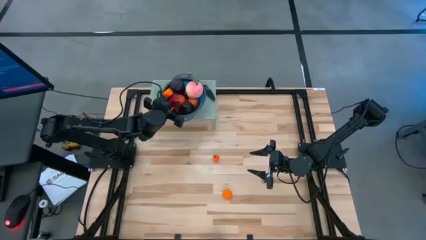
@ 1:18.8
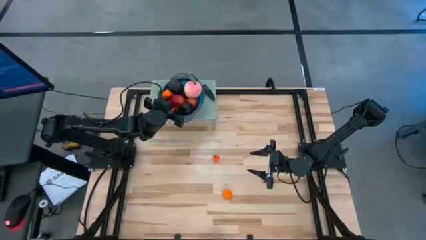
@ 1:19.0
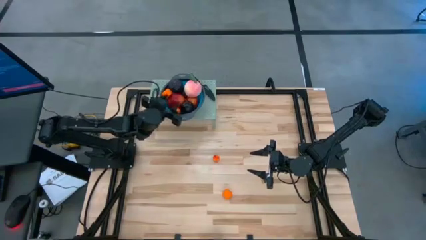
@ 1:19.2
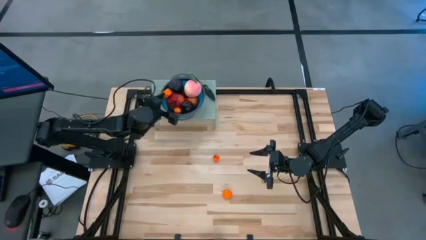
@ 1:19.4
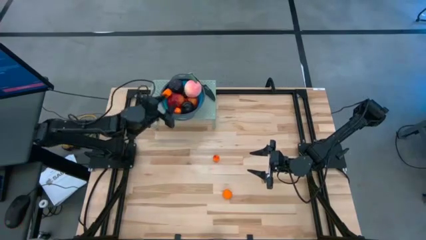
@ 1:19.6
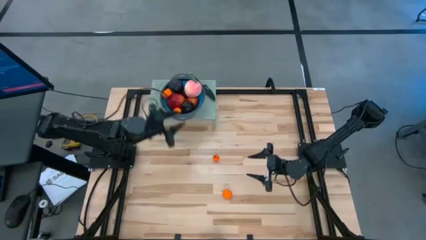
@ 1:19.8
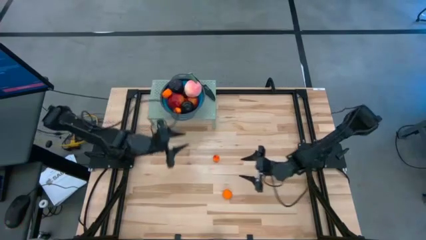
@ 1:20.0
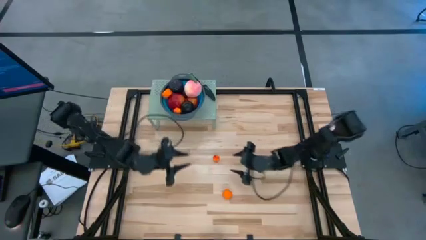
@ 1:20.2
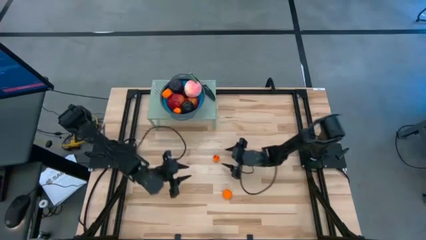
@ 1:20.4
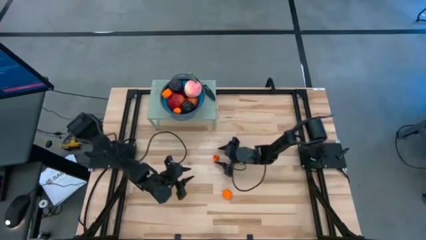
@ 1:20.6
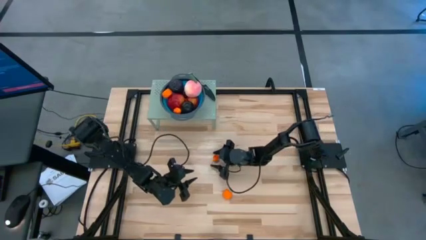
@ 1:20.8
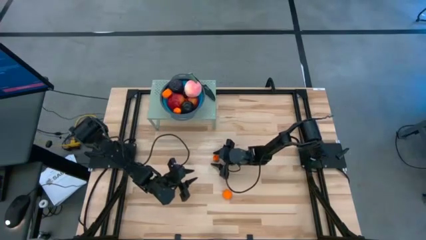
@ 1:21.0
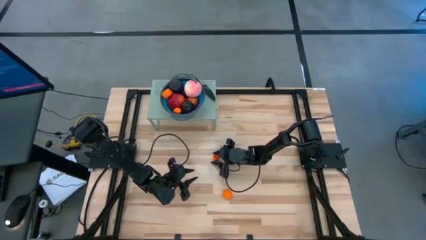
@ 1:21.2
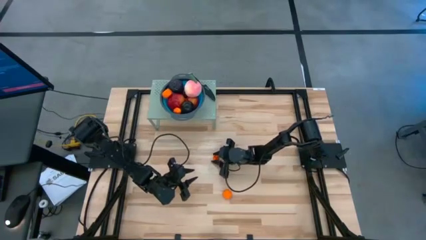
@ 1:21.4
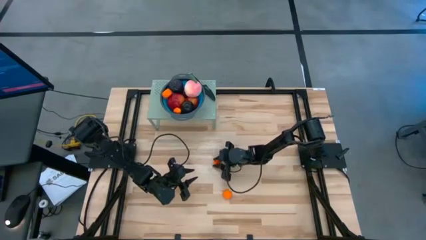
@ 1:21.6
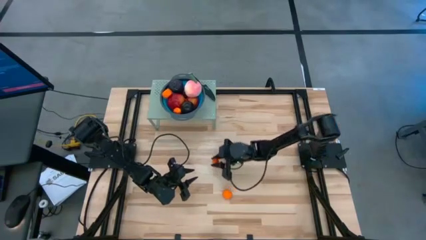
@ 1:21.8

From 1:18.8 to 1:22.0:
Task: Pick & Place Fruit
Put the orange pear into the blue strainer bowl on the shelf

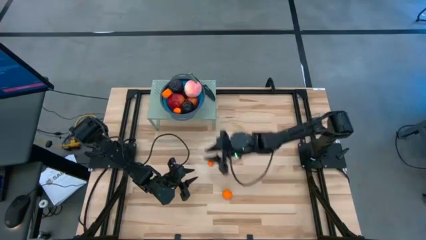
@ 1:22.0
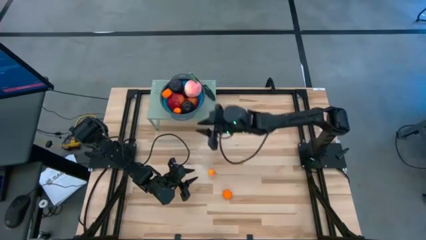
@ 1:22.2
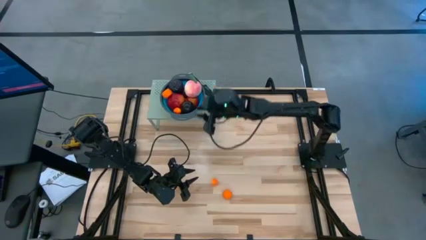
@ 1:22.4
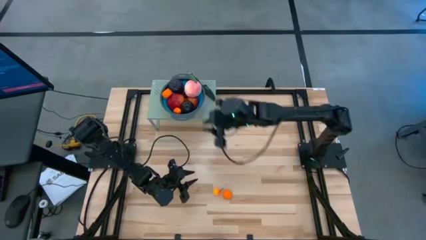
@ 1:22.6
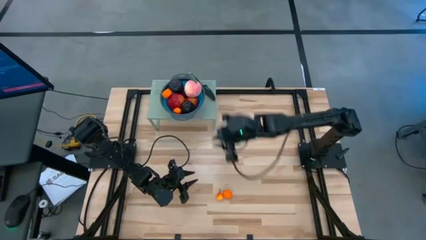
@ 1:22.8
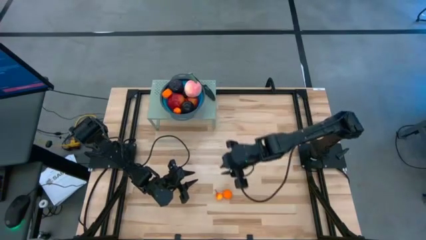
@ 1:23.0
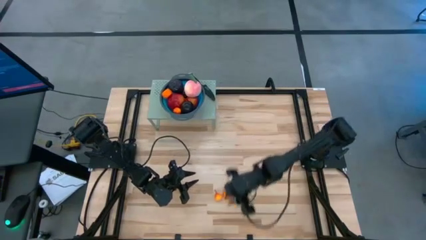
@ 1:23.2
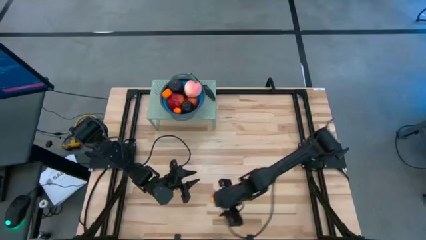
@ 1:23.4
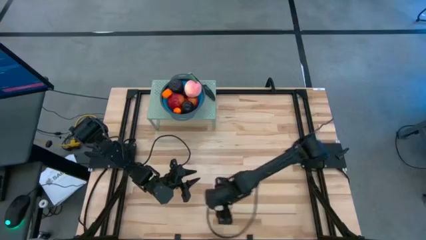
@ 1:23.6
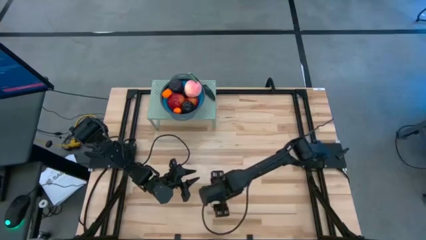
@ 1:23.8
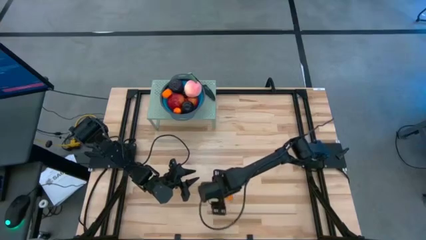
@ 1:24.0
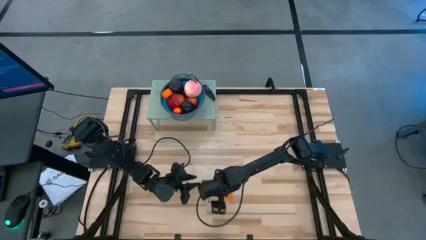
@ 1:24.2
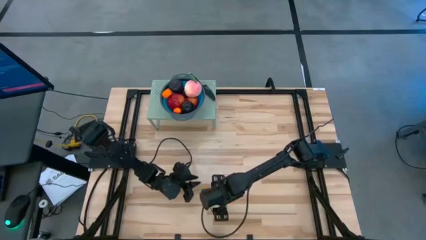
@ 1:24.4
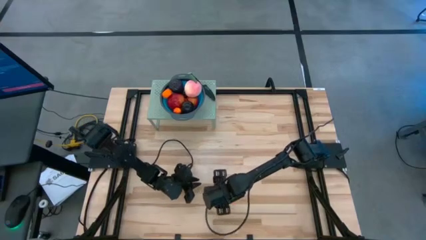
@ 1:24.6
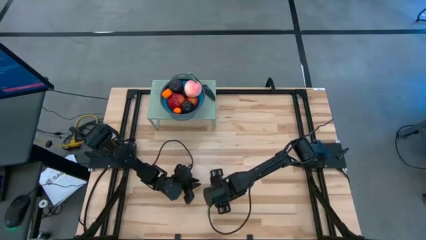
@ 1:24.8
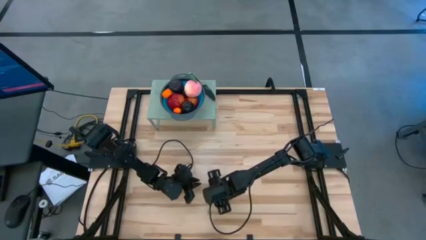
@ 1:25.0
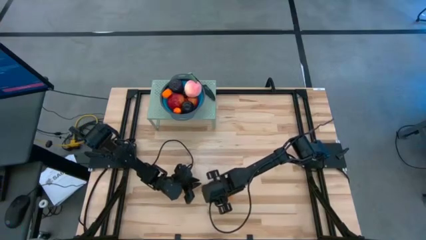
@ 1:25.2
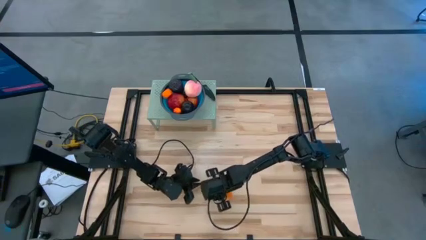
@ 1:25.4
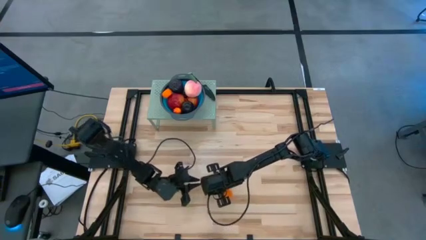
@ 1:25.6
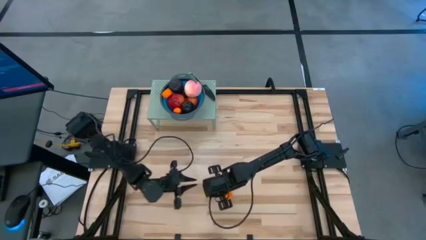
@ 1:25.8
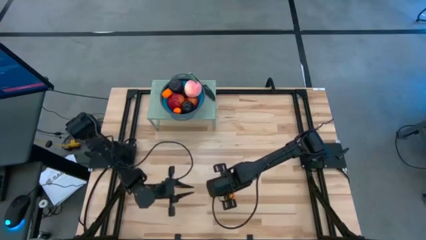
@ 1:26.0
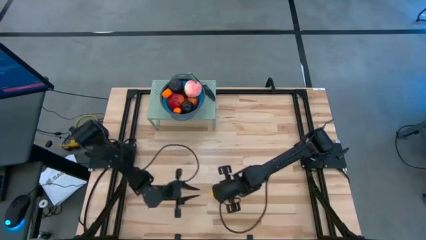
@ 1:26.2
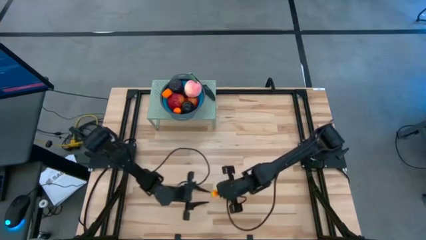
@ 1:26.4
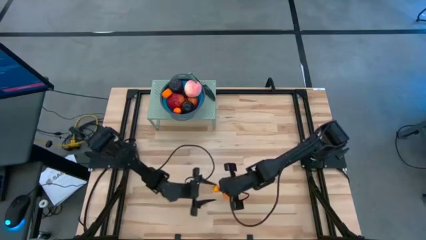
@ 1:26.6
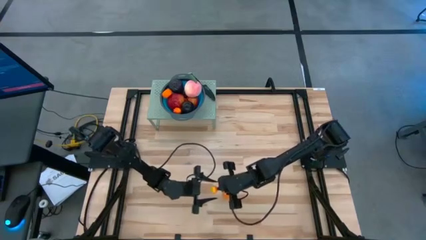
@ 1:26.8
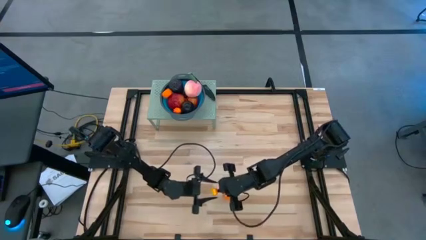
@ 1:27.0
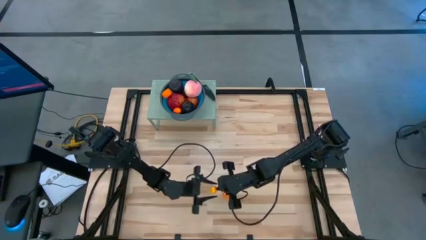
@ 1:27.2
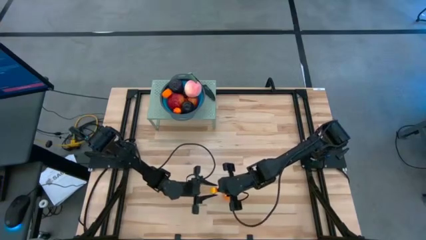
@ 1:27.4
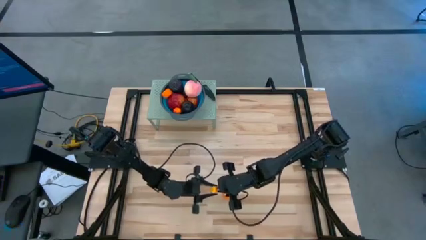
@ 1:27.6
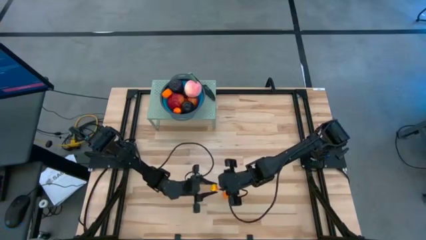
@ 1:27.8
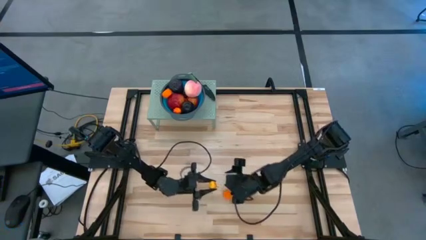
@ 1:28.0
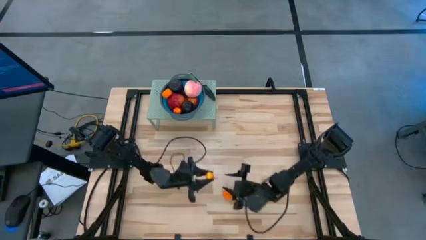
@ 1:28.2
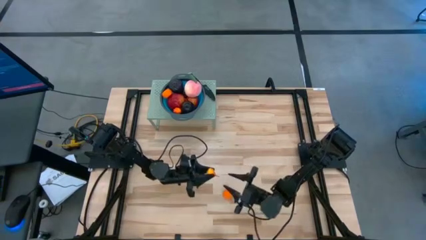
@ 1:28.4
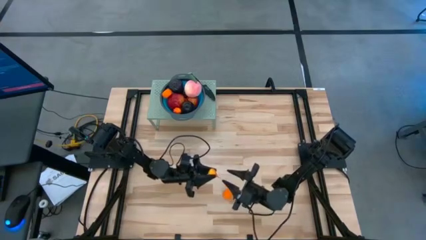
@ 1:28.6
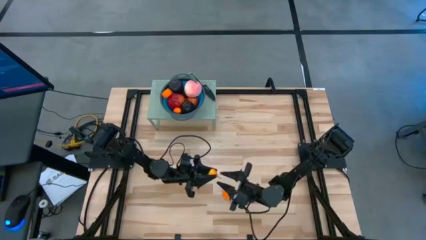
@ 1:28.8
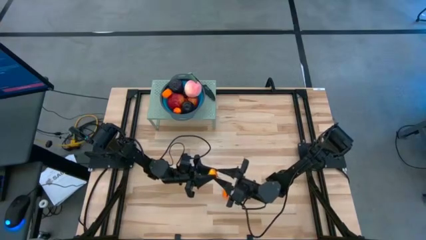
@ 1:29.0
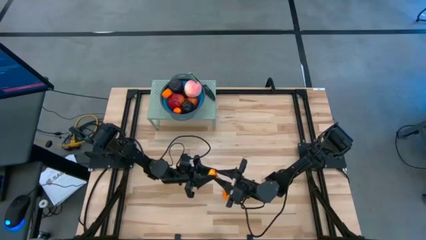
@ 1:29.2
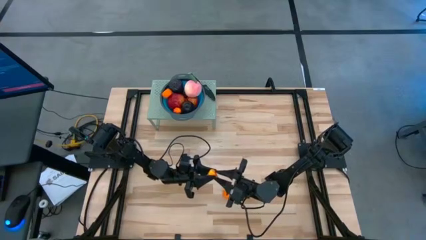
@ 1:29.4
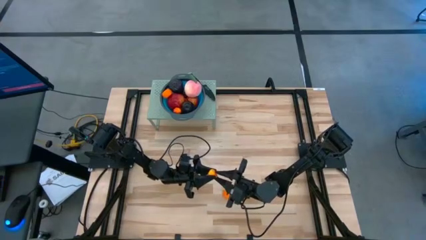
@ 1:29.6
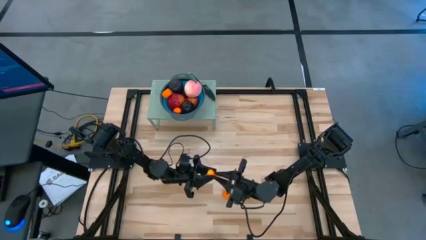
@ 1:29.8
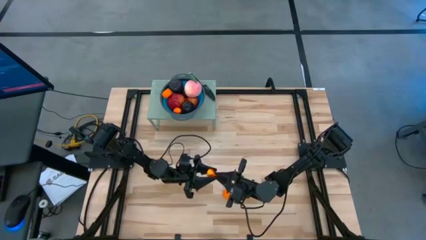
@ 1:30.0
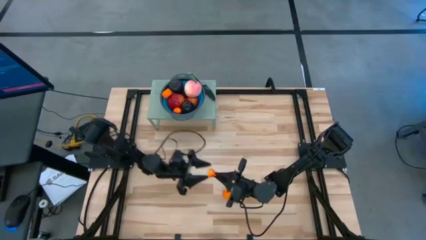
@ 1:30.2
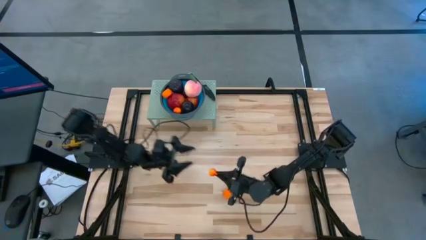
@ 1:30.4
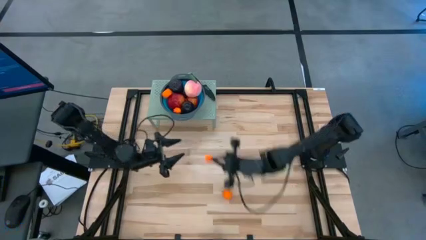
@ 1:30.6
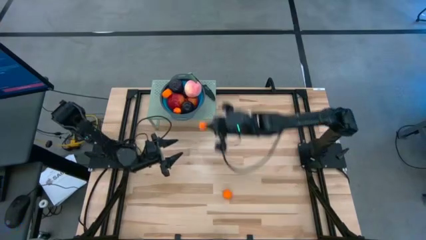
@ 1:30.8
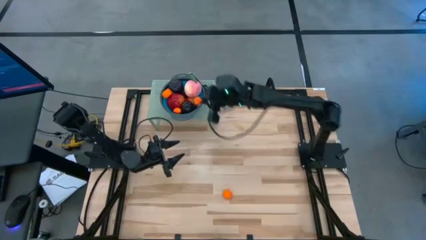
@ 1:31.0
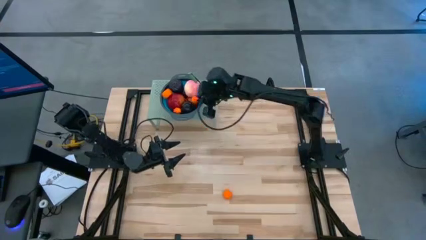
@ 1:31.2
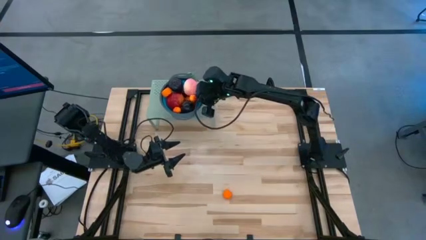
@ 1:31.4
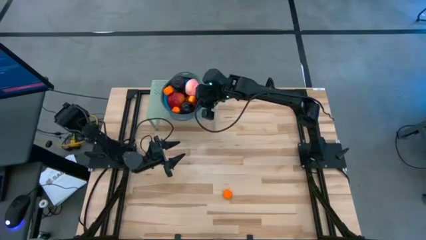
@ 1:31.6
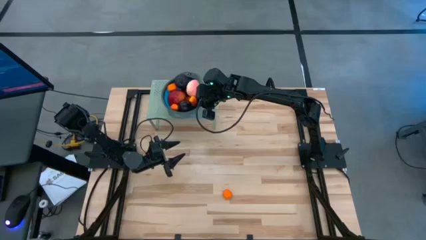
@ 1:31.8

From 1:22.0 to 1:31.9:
Put the orange pear into the blue strainer bowl on the shelf

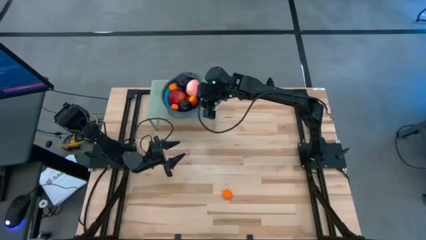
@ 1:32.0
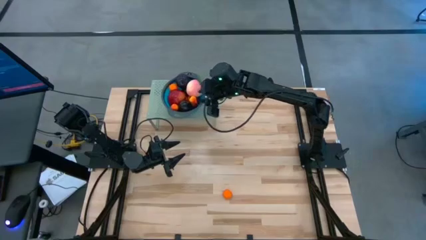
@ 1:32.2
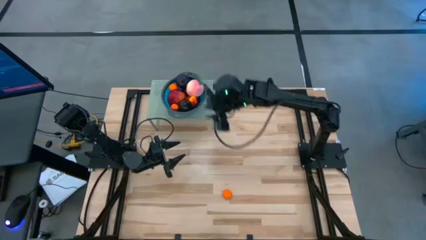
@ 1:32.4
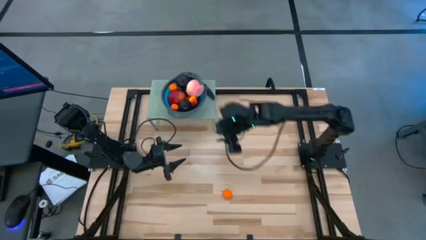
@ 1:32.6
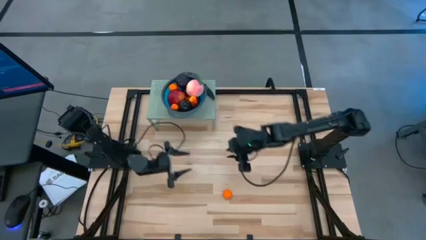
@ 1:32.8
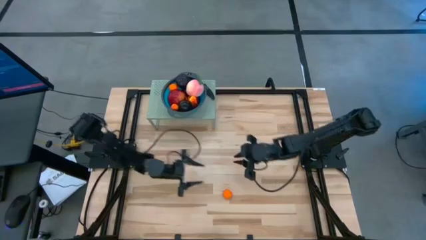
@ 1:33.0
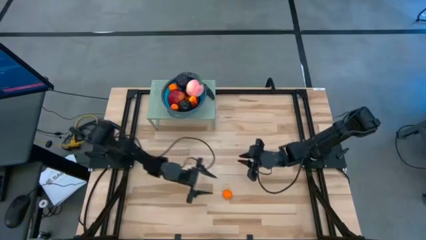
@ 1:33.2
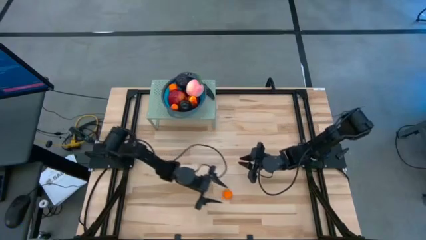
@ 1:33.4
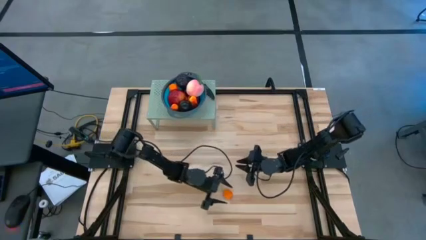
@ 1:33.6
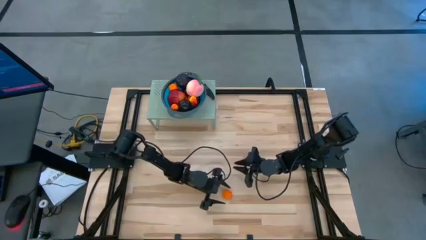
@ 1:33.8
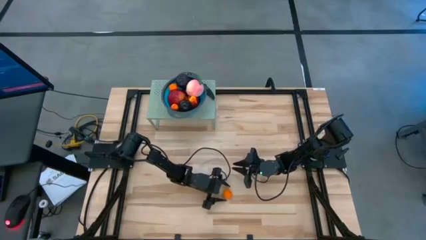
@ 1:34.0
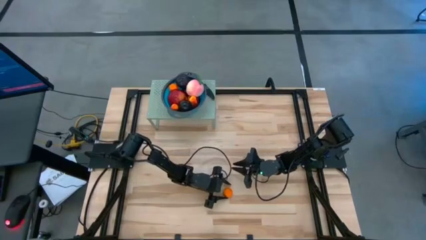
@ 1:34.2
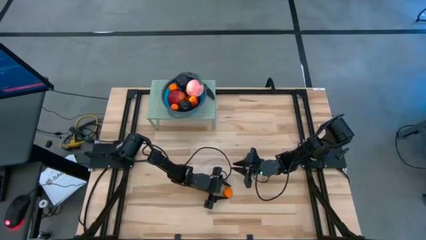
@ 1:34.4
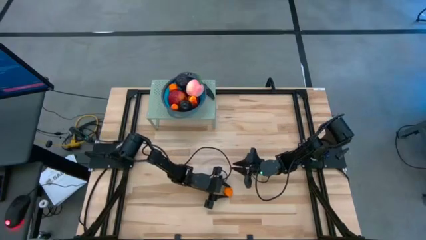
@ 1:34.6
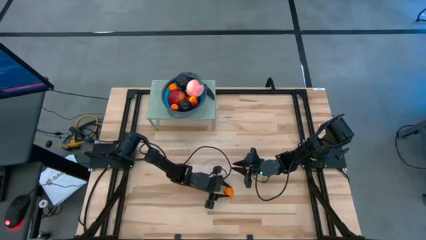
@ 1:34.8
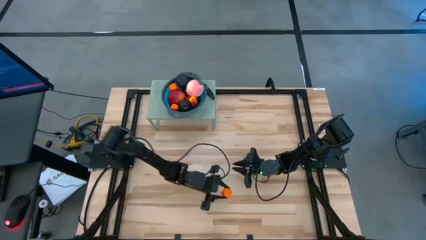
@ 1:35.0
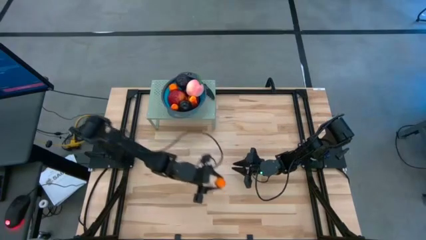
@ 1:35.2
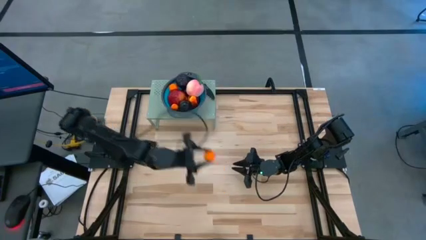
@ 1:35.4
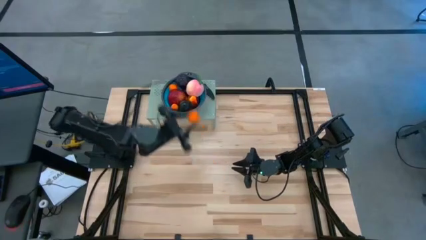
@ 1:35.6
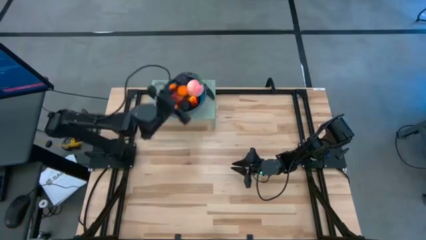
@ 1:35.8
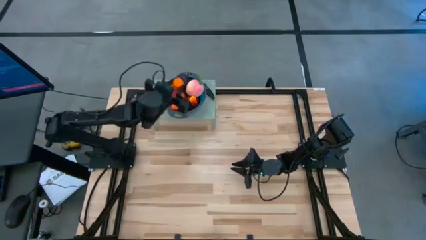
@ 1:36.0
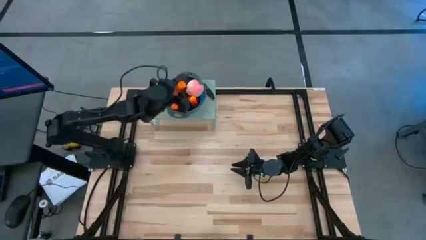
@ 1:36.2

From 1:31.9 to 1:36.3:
Put the orange into the blue strainer bowl on the shelf
